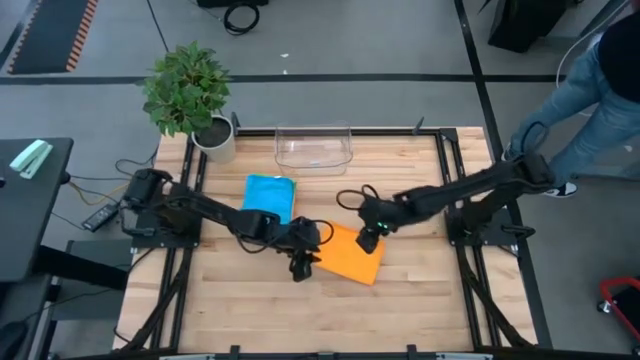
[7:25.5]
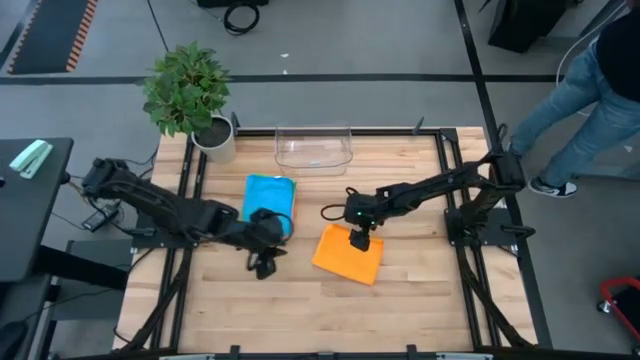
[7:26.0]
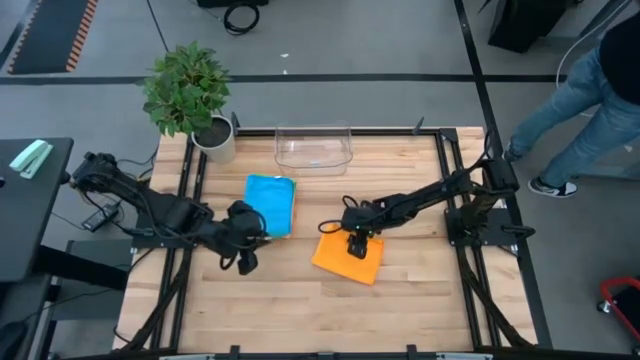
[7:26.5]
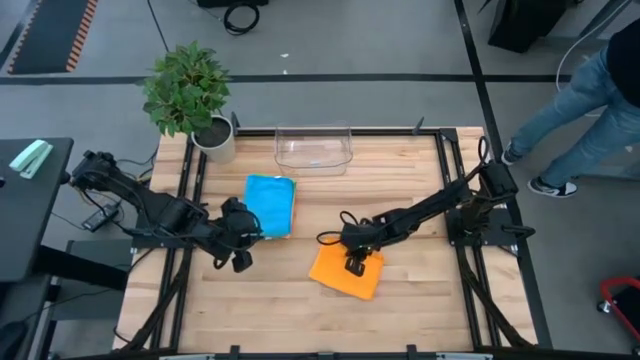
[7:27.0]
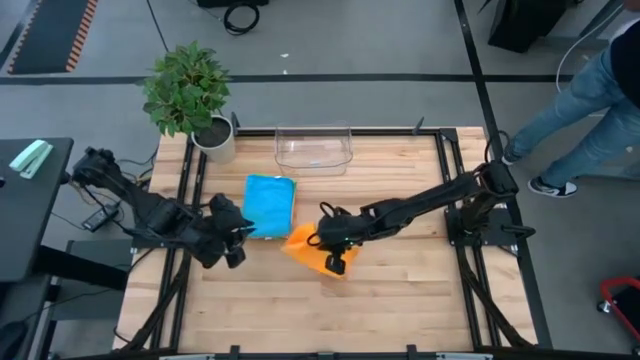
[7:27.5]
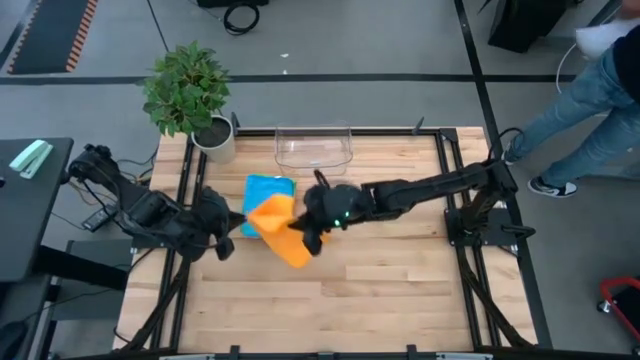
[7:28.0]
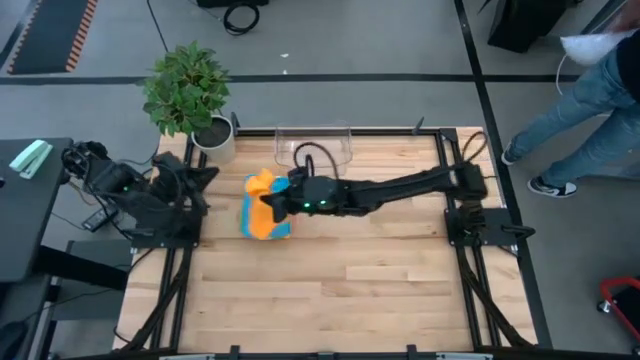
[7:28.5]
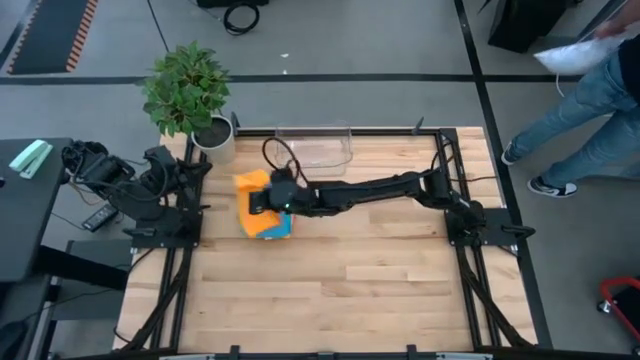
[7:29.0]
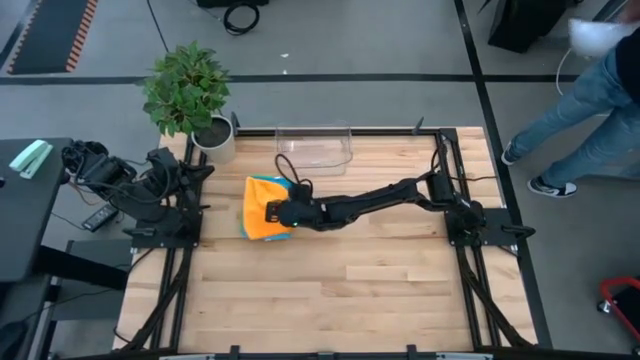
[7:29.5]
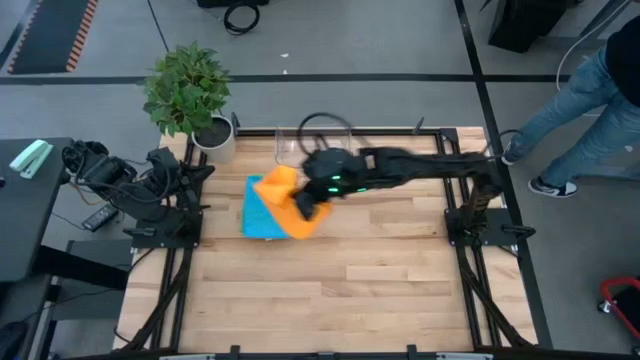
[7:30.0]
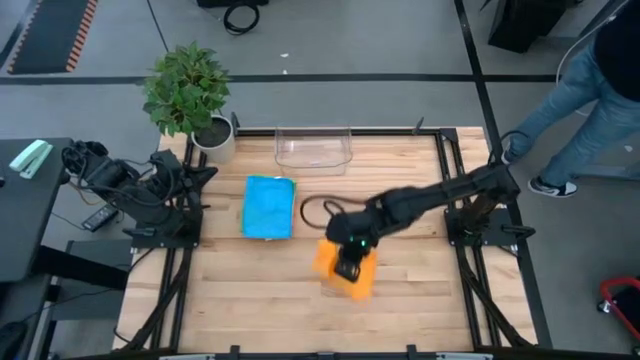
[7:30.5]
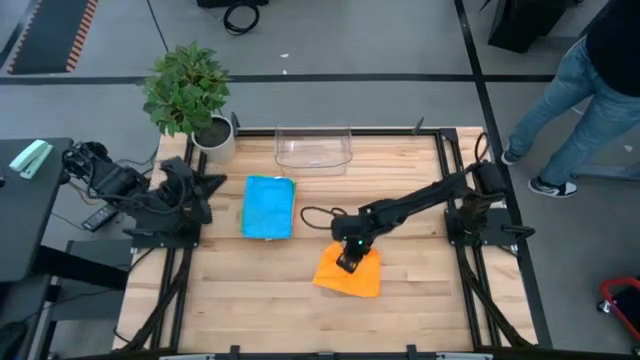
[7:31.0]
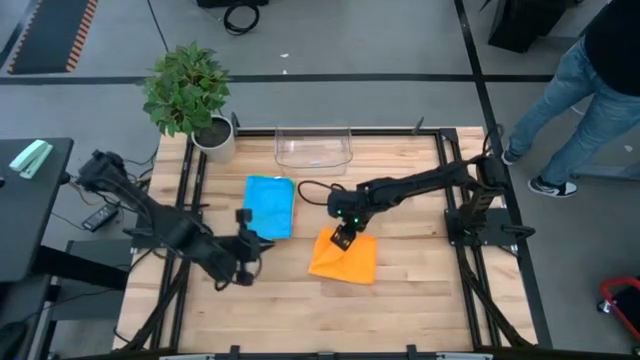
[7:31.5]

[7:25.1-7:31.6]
Task: Fold microfiber towels
Stack the folded orange microfiber cloth on top of the folded blue microfiber cloth

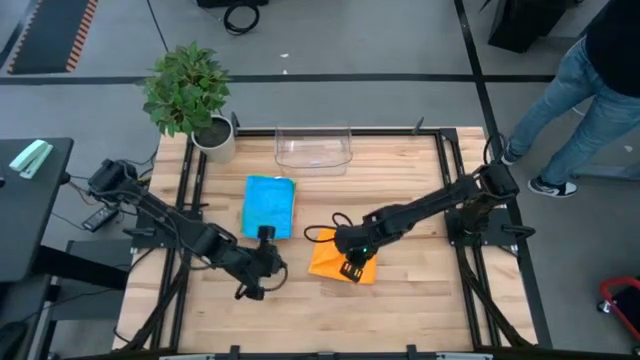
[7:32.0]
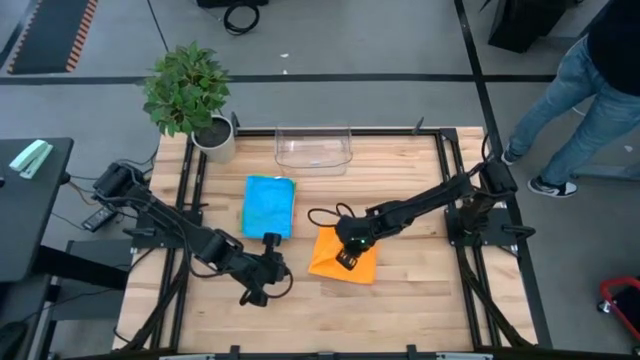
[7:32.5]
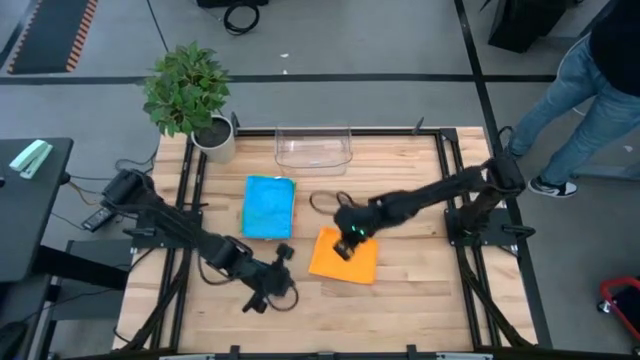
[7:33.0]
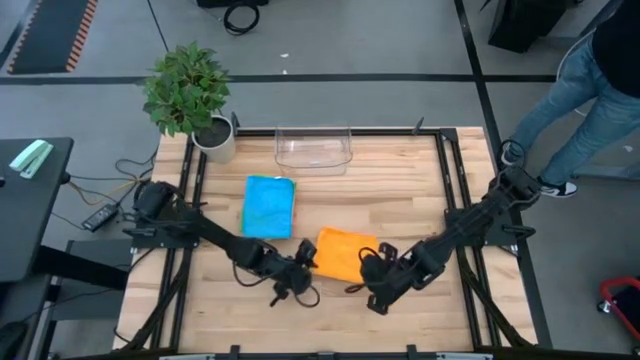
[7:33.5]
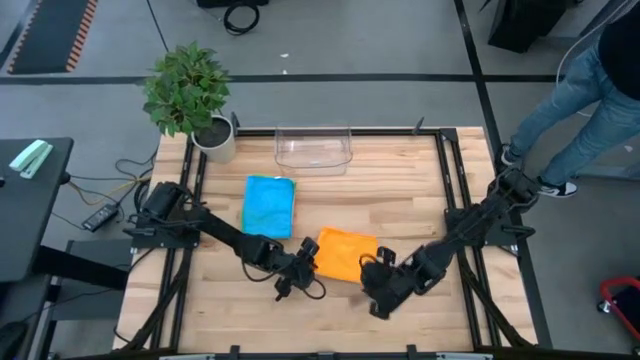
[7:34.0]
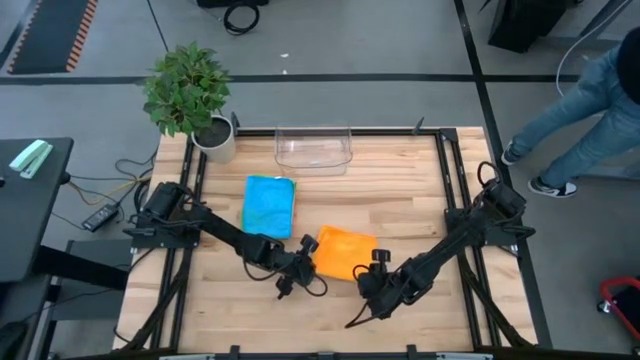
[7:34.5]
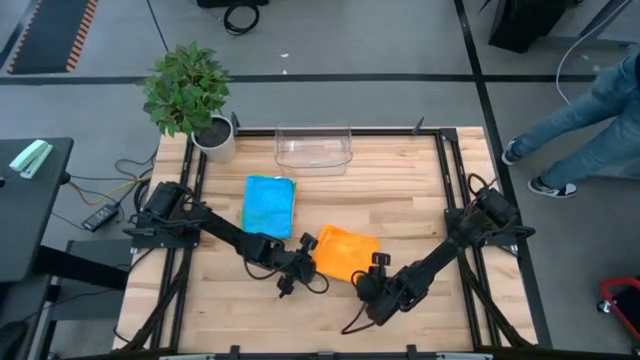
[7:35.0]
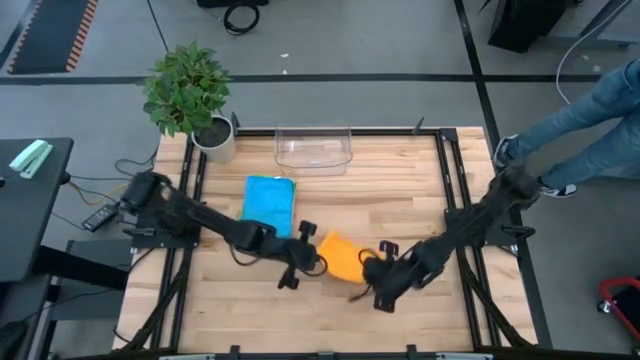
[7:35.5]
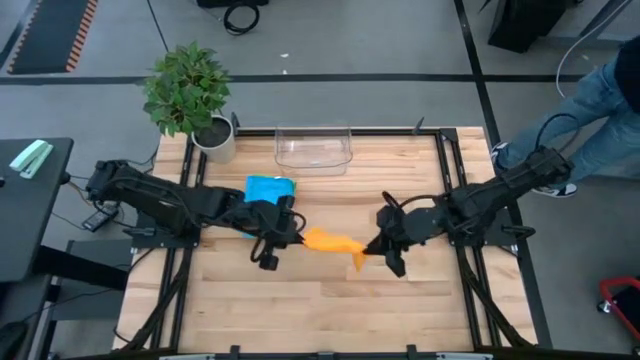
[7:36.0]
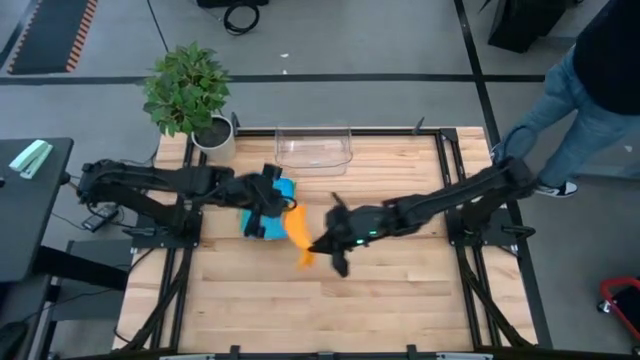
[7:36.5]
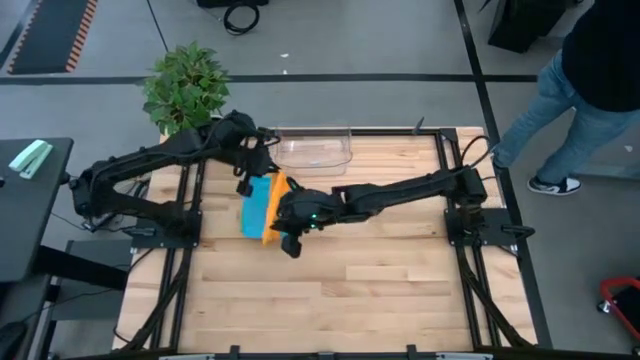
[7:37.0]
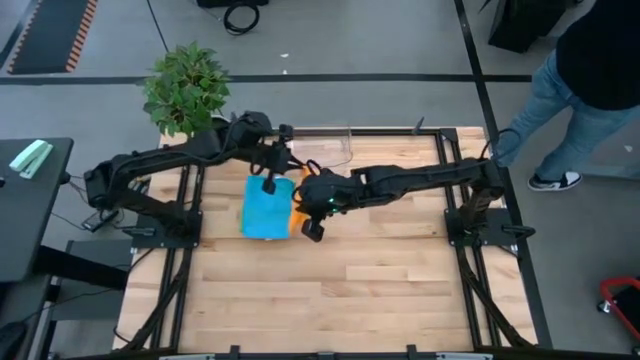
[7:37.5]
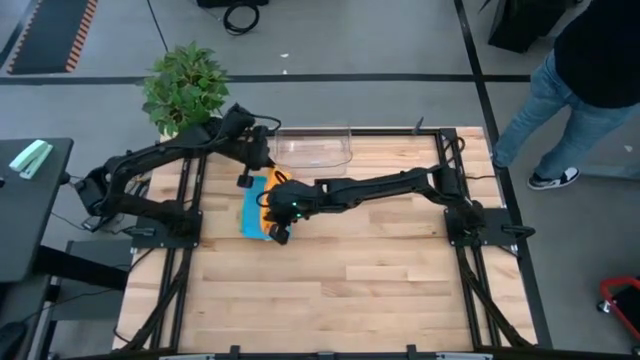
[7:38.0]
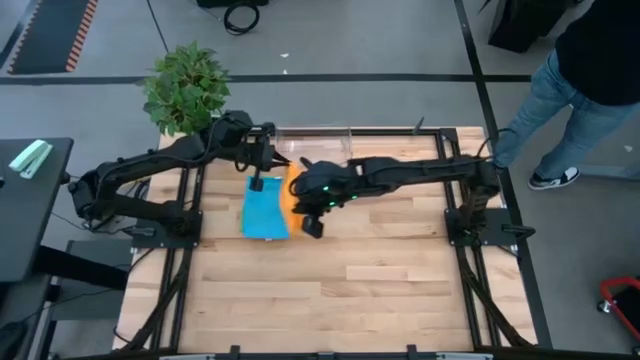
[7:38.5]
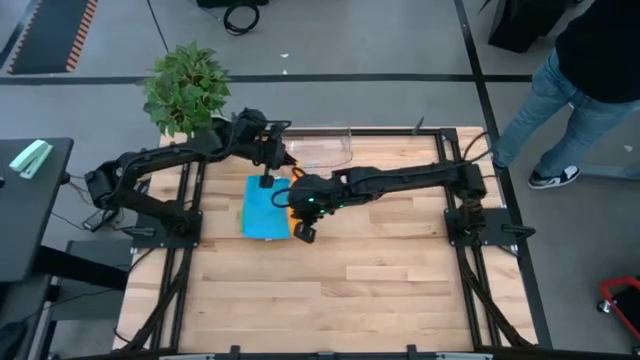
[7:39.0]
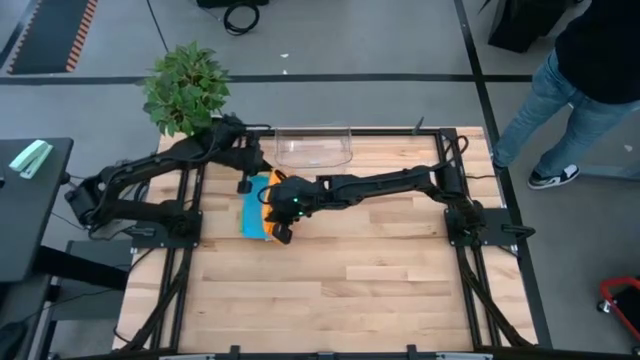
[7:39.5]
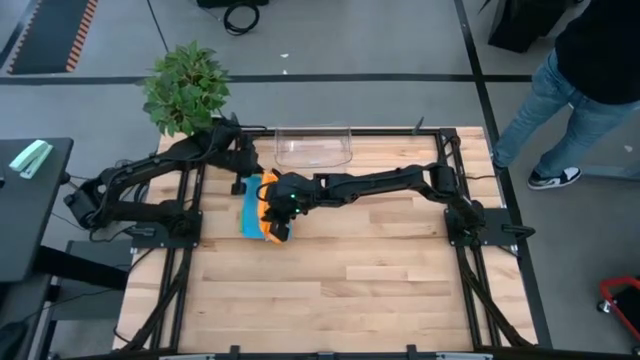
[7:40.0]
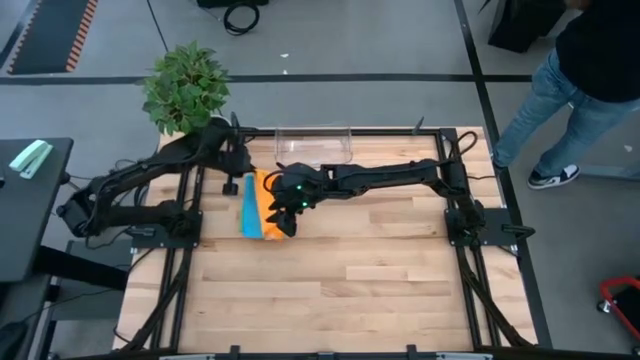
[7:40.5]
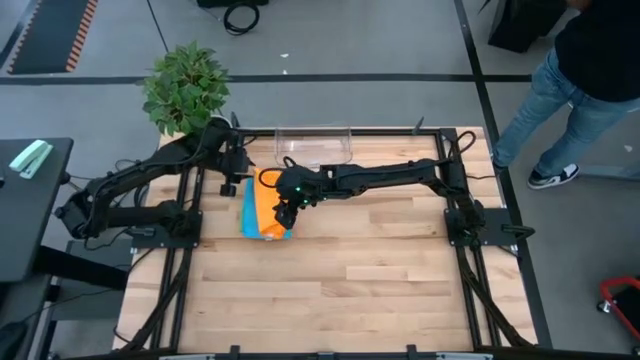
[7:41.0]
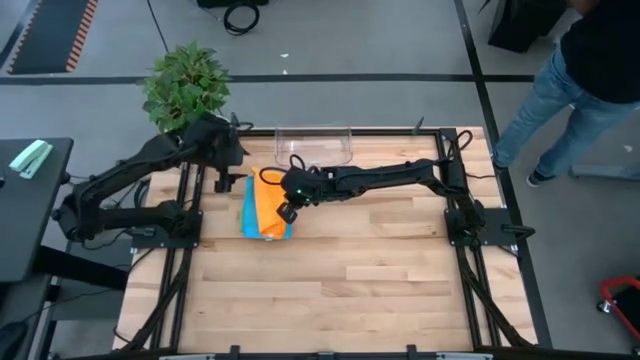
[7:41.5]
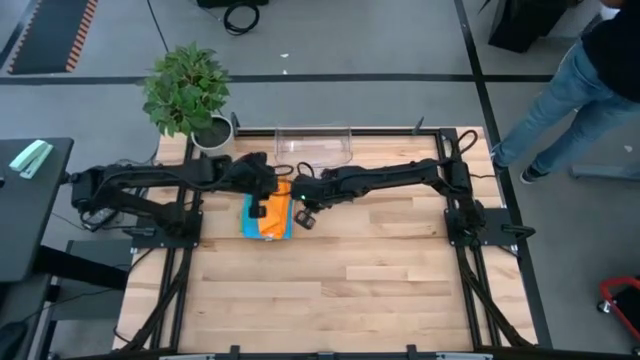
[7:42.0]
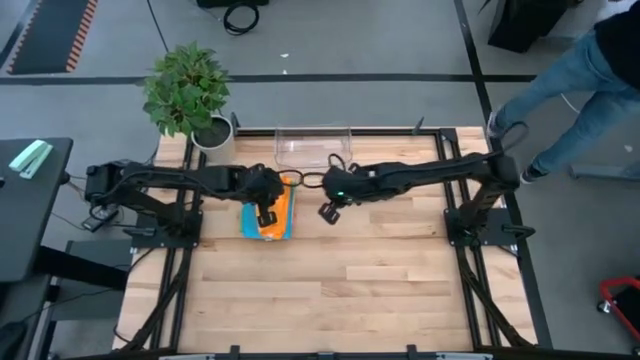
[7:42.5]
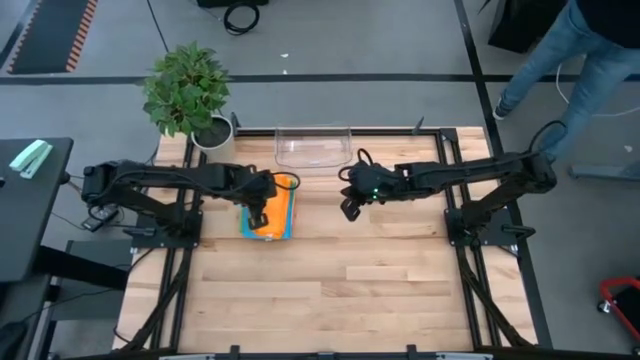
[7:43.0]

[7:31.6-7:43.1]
Stack the folded orange microfiber cloth on top of the folded blue microfiber cloth

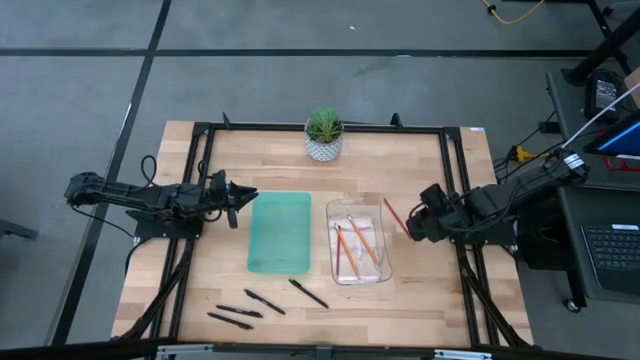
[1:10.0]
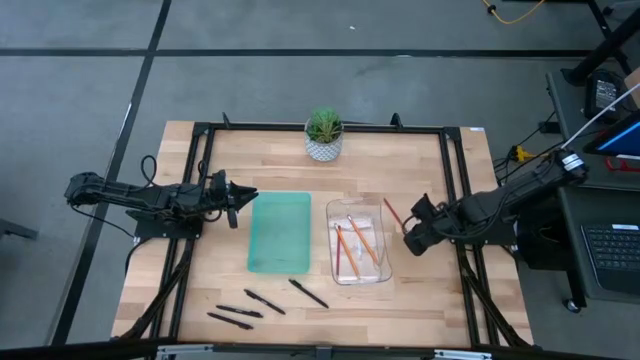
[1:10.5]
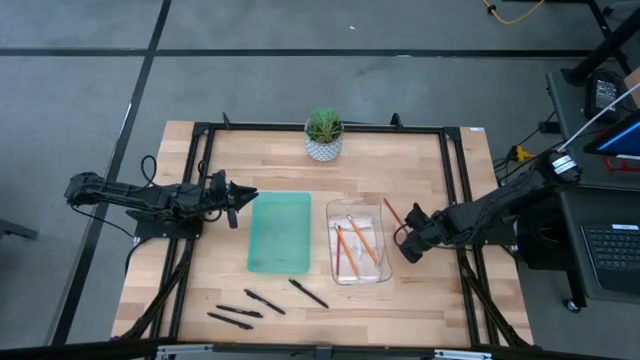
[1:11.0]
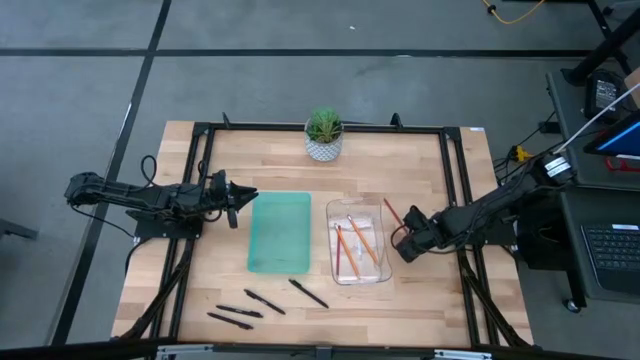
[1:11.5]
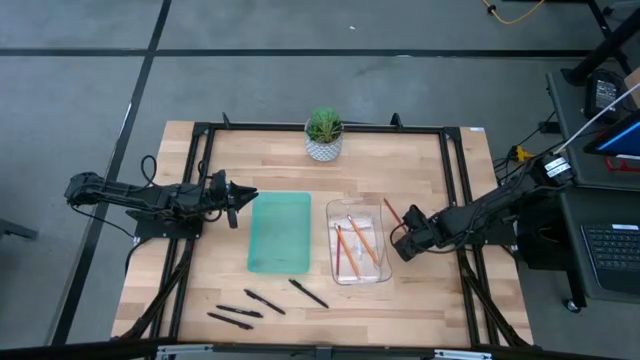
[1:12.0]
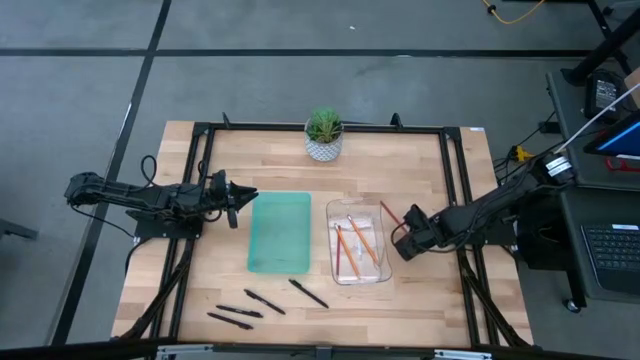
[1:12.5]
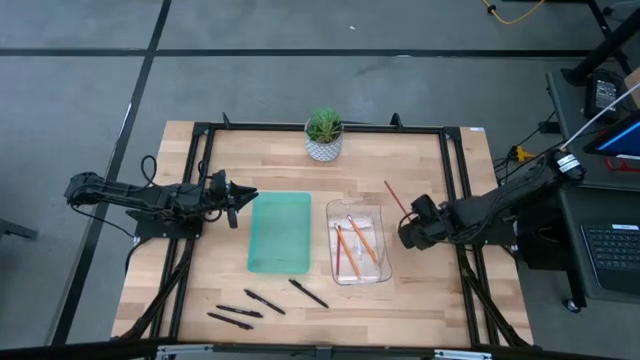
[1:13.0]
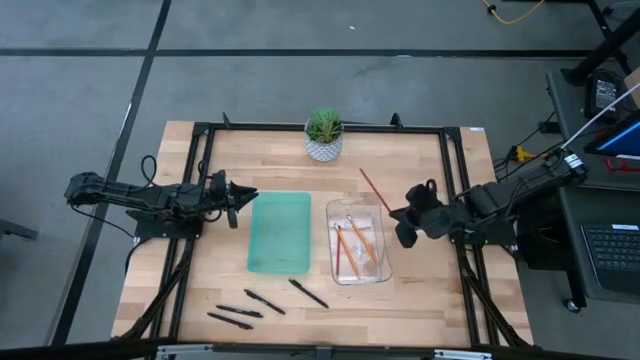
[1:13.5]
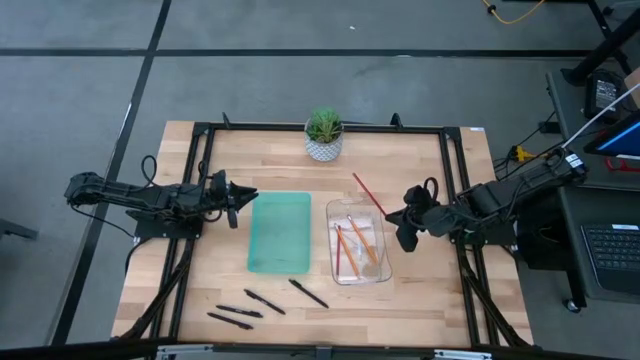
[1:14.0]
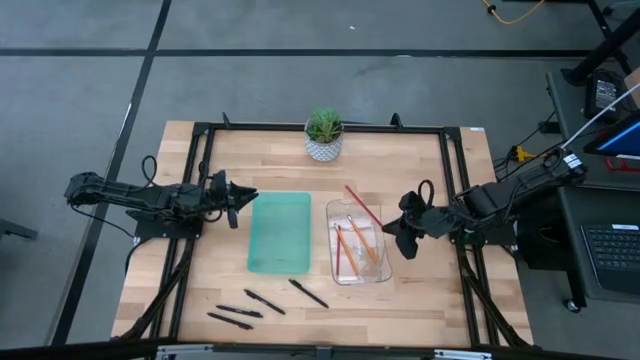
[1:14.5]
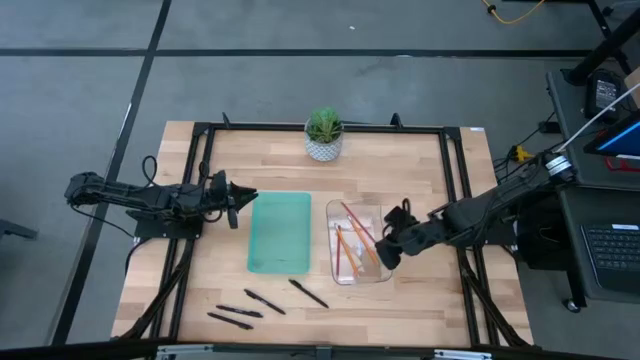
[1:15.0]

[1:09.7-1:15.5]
Task: Sort pens & pencils
Put the red pencil into the transparent bin
